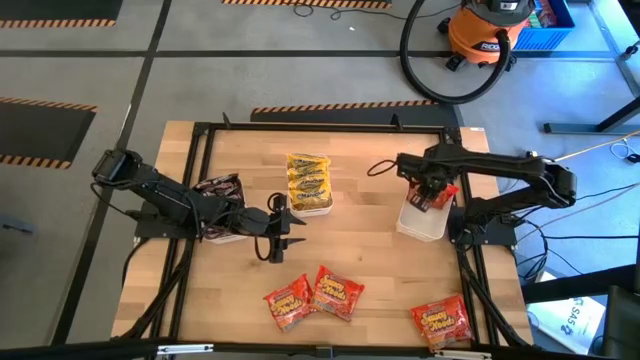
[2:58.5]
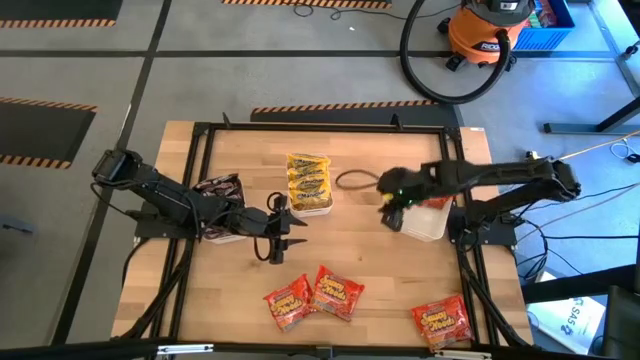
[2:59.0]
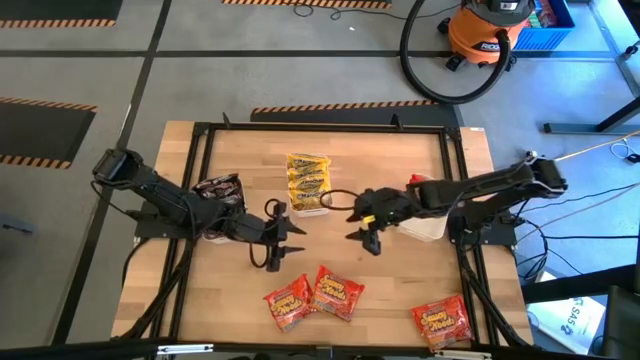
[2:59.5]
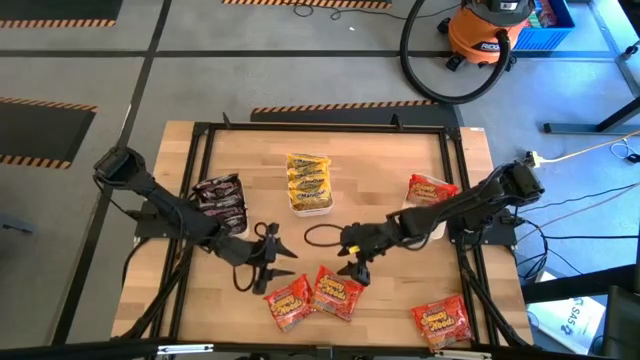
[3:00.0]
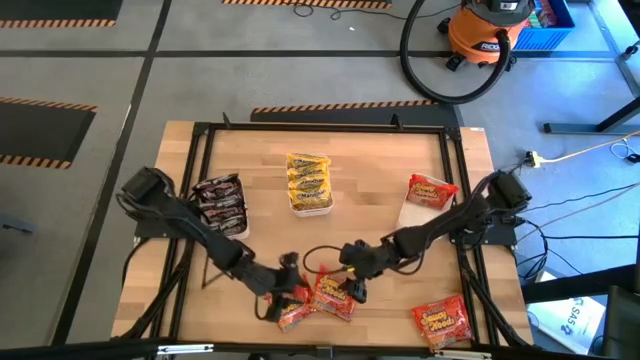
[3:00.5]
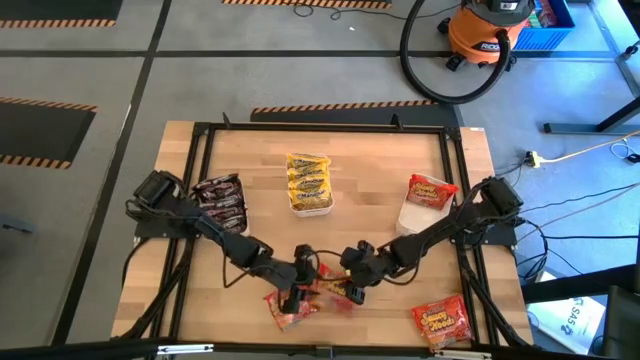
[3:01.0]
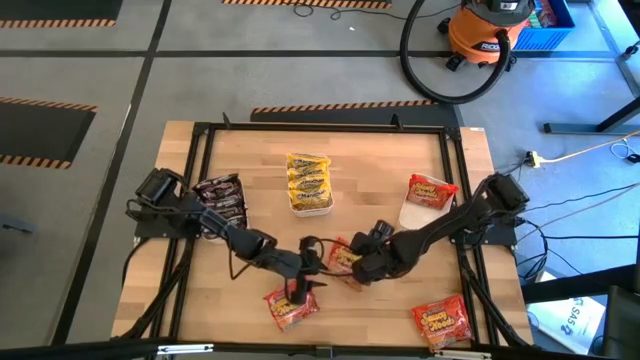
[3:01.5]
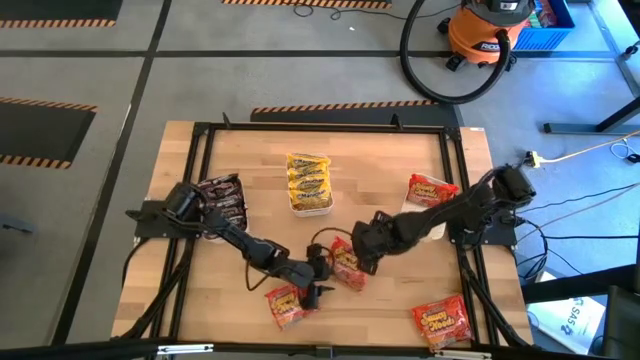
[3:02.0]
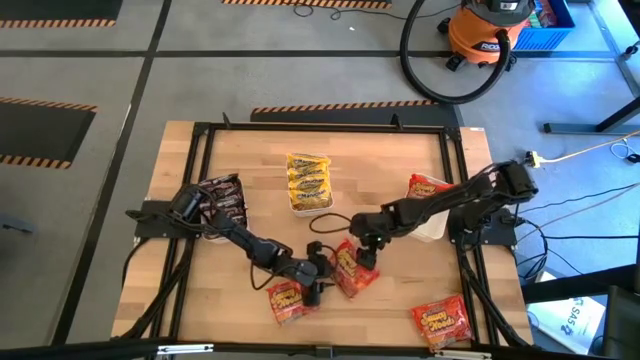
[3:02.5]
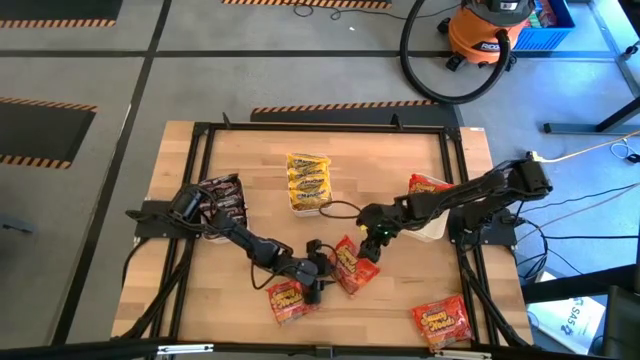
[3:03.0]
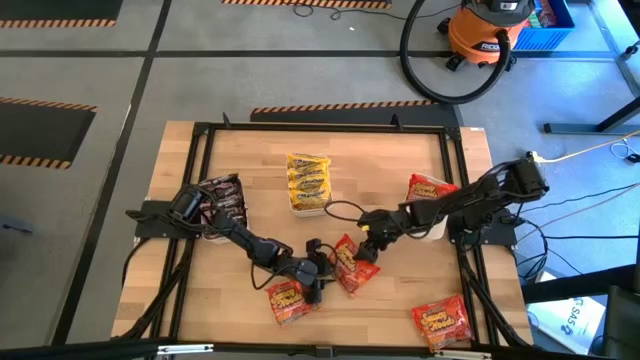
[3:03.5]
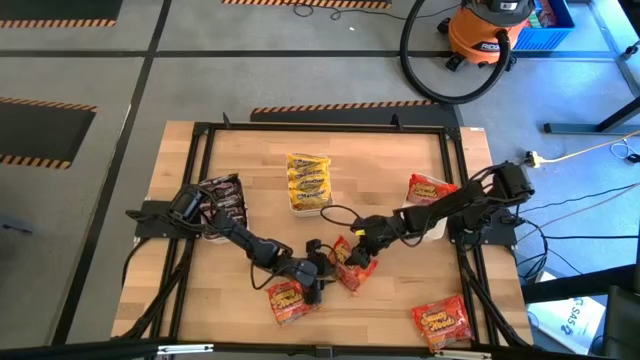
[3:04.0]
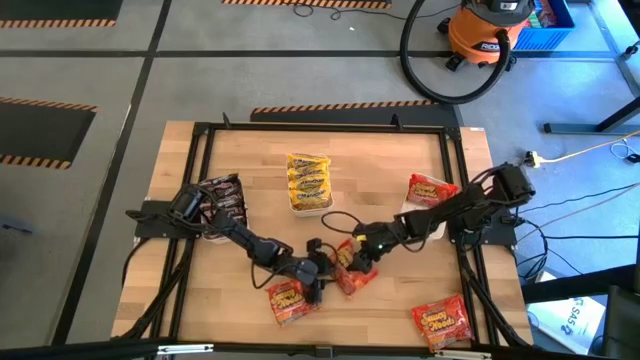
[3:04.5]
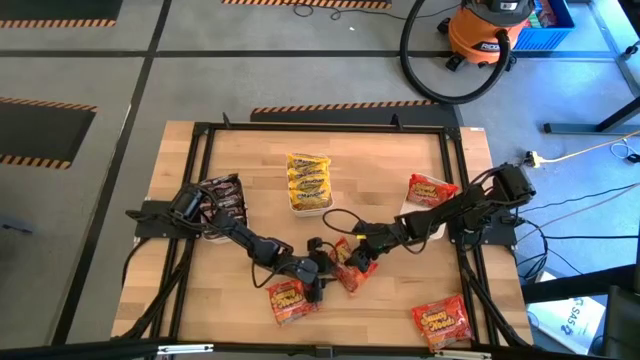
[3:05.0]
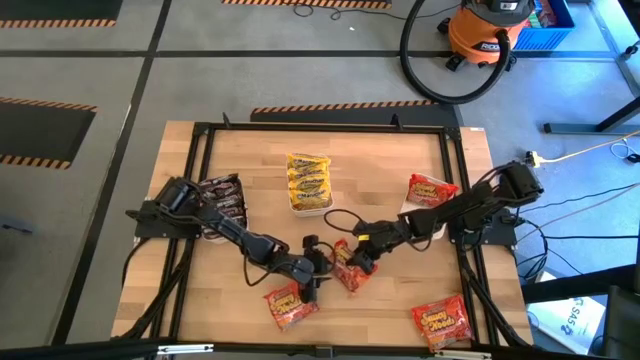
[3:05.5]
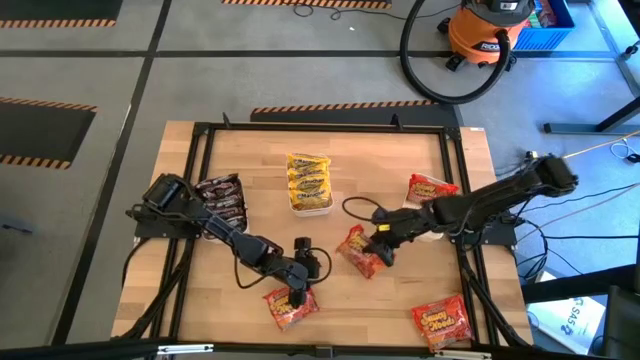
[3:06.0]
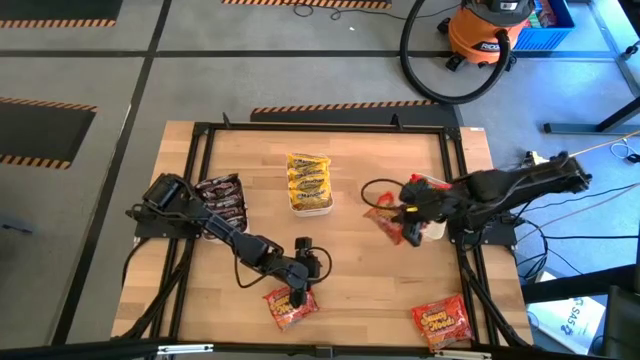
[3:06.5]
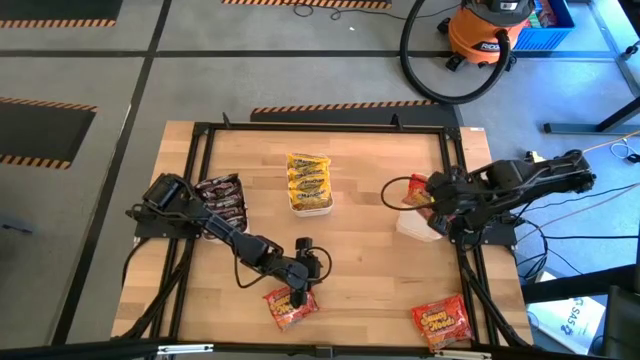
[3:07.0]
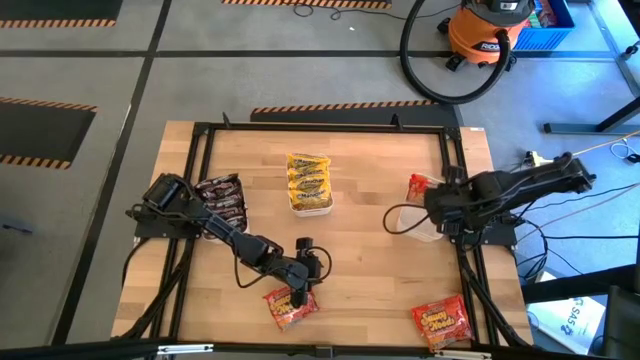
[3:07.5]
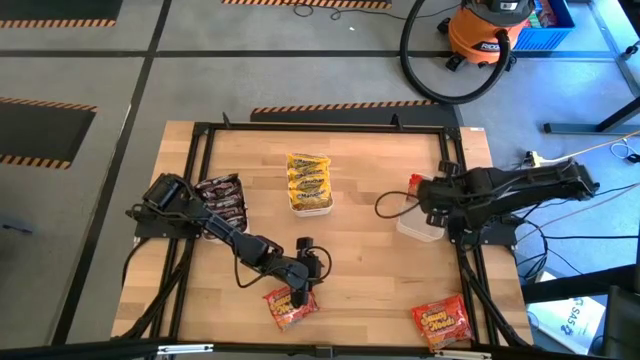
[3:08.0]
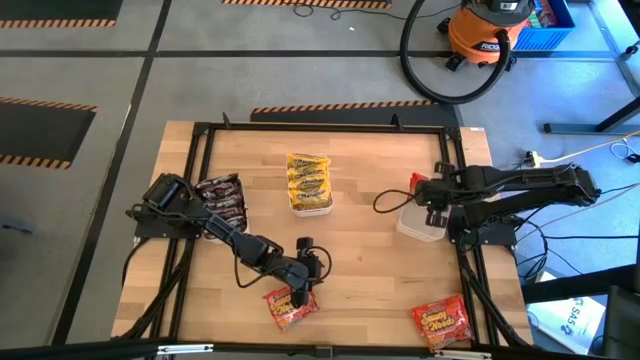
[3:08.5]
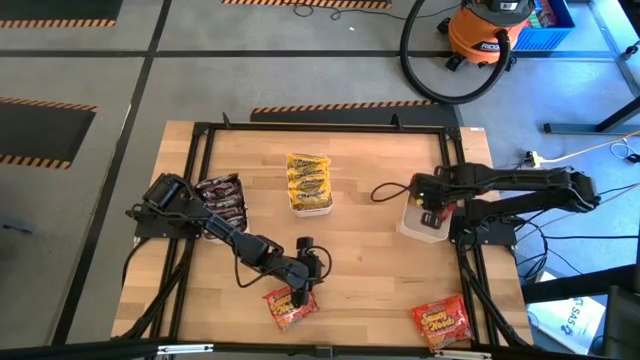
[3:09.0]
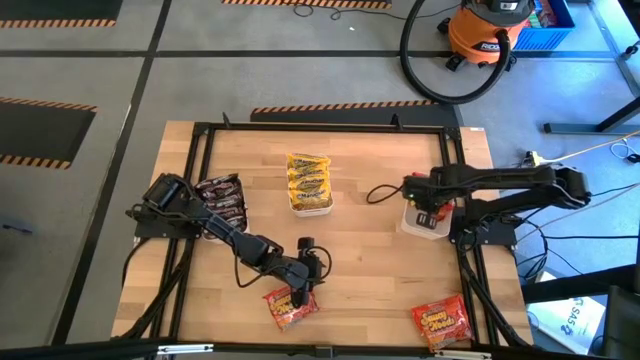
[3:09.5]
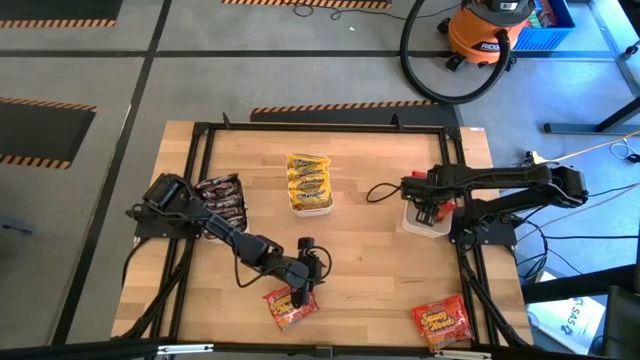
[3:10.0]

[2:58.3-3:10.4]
Task: Sort Maruchan noodles
Put the center orange noodle pack into the right white bin

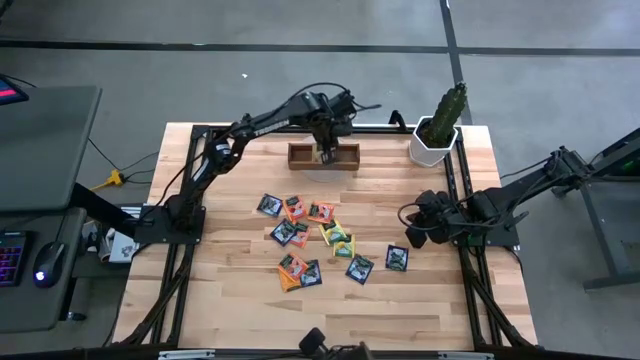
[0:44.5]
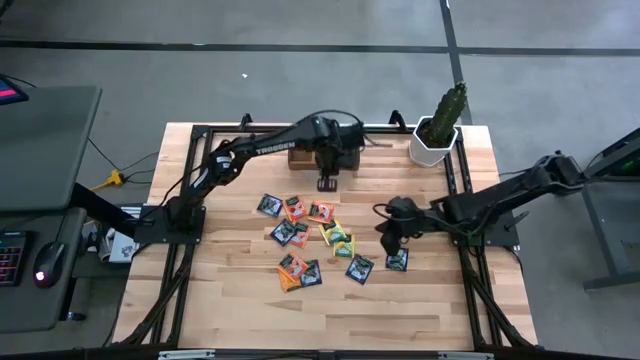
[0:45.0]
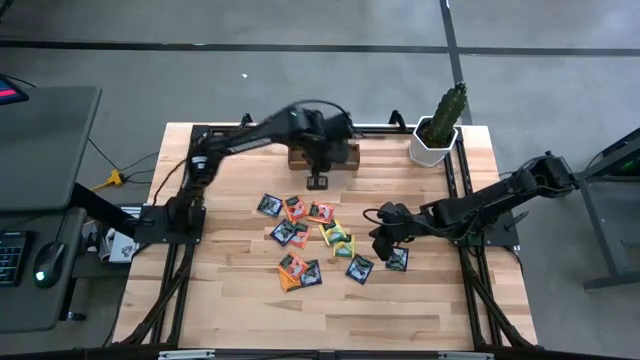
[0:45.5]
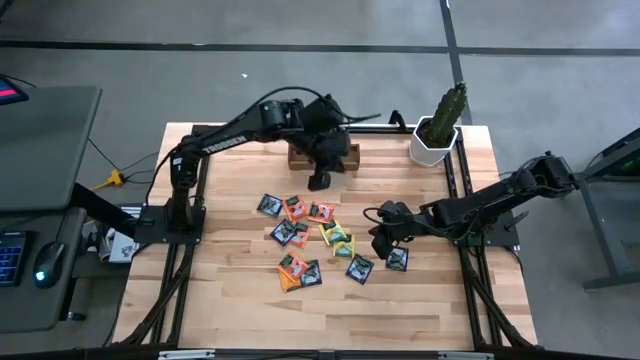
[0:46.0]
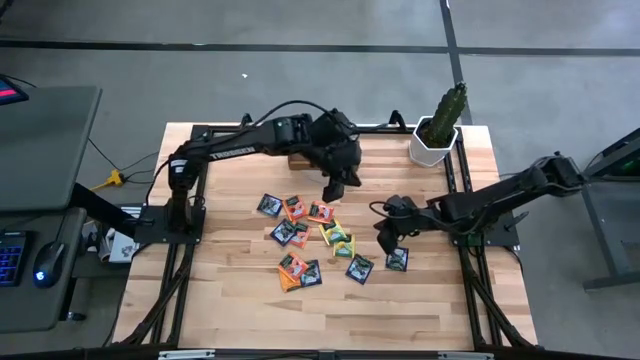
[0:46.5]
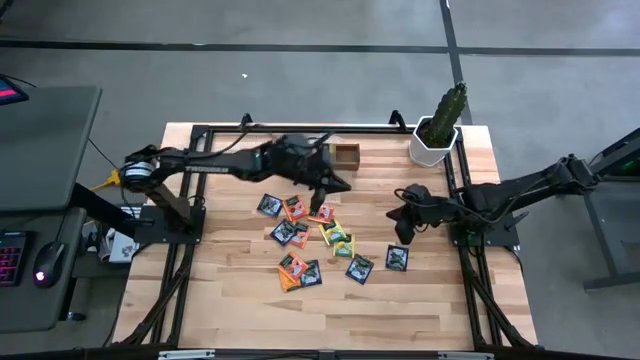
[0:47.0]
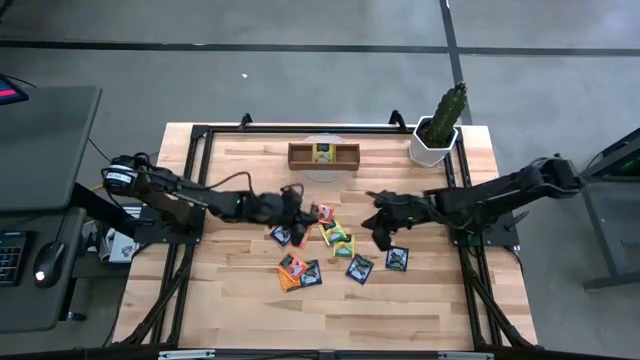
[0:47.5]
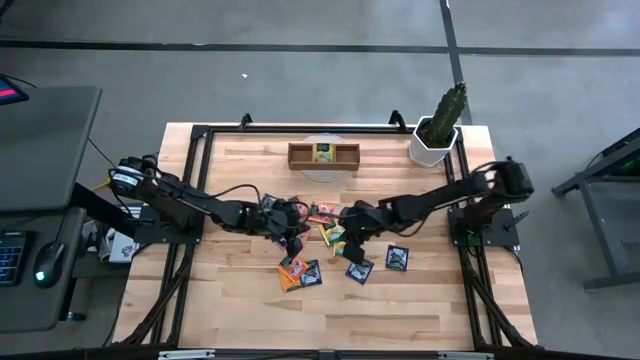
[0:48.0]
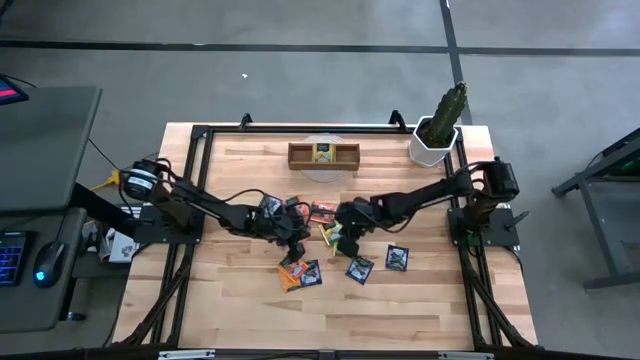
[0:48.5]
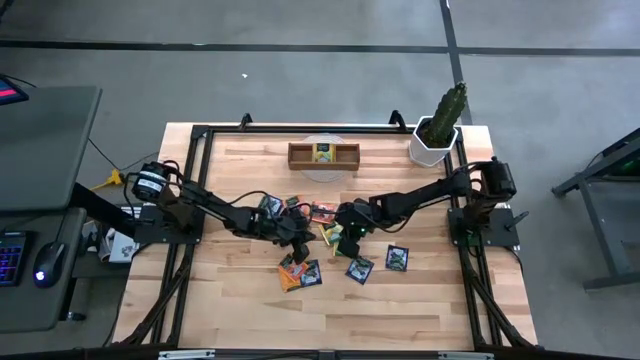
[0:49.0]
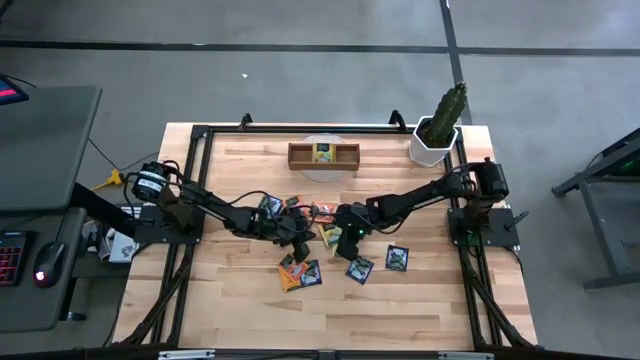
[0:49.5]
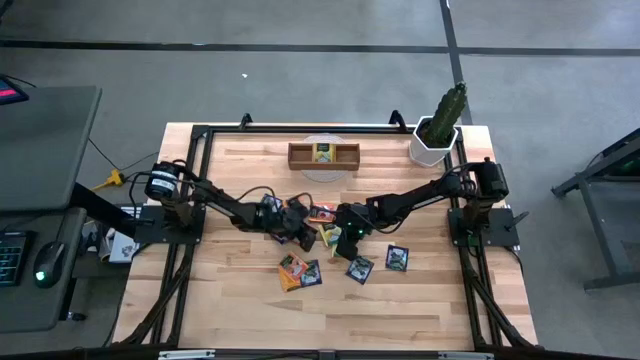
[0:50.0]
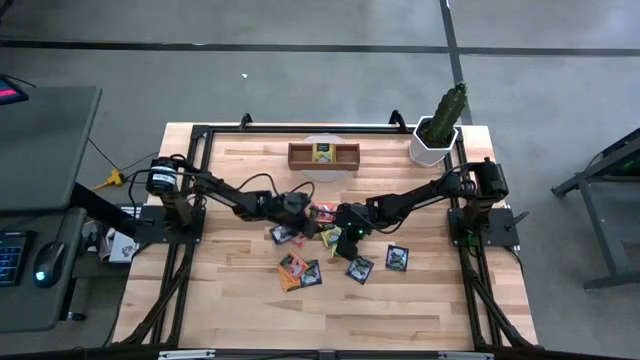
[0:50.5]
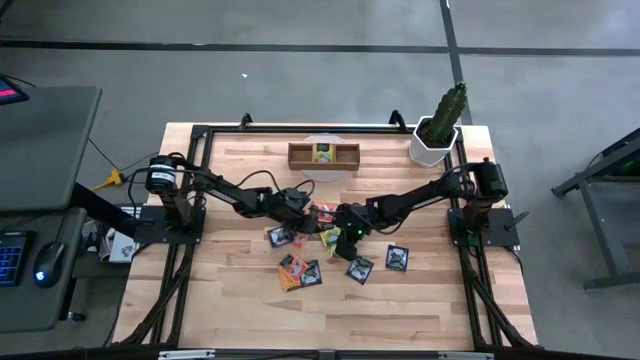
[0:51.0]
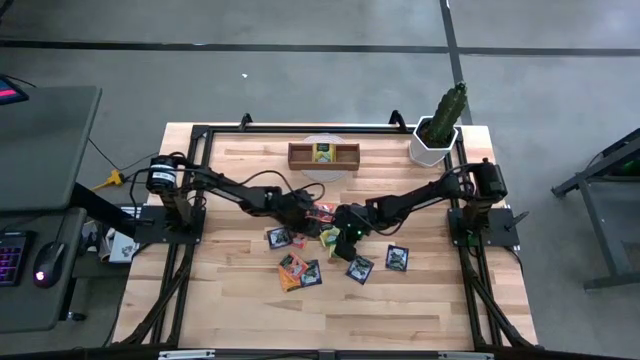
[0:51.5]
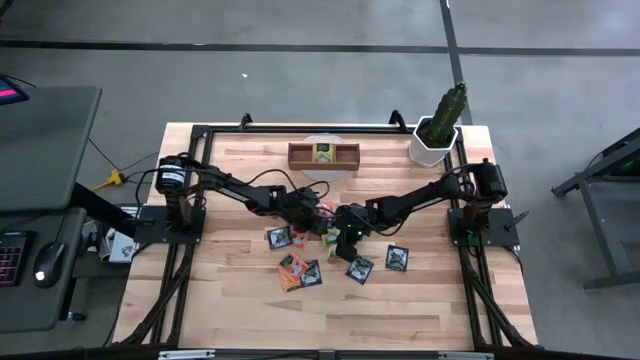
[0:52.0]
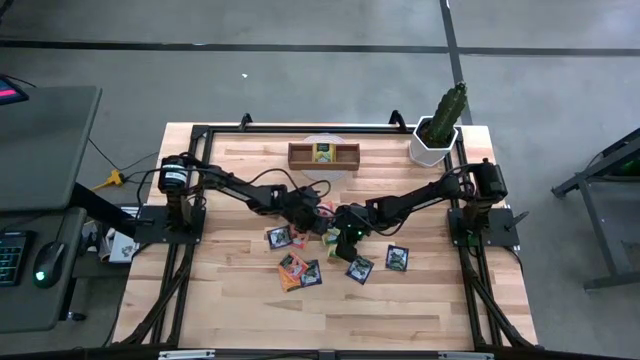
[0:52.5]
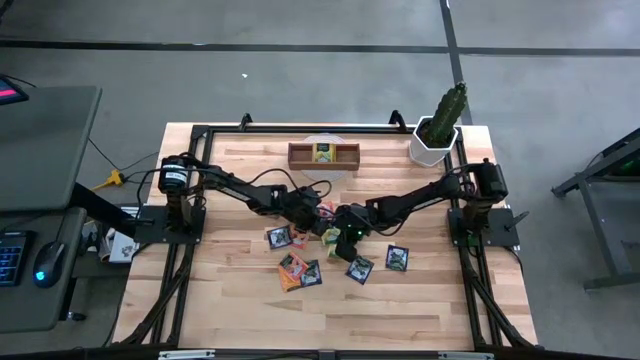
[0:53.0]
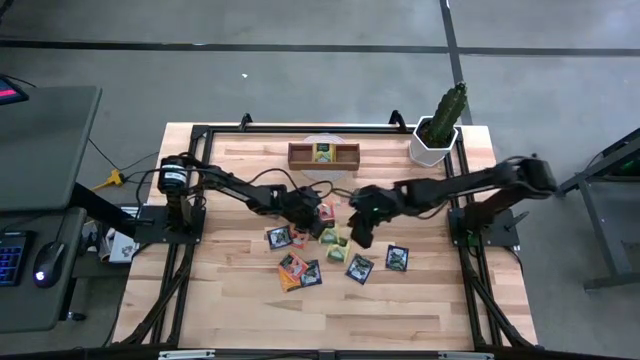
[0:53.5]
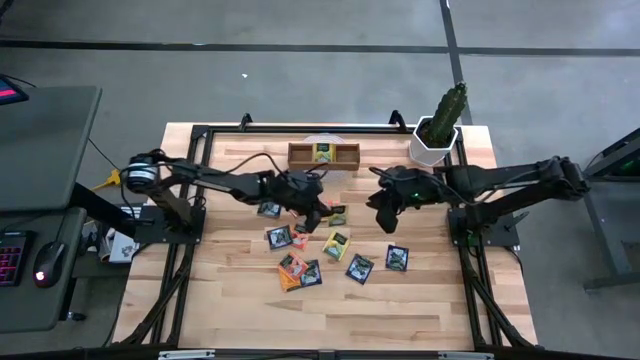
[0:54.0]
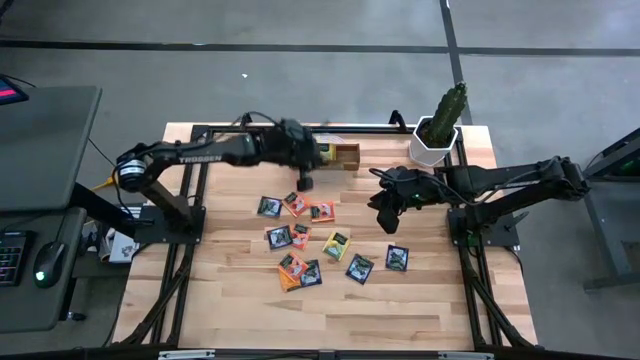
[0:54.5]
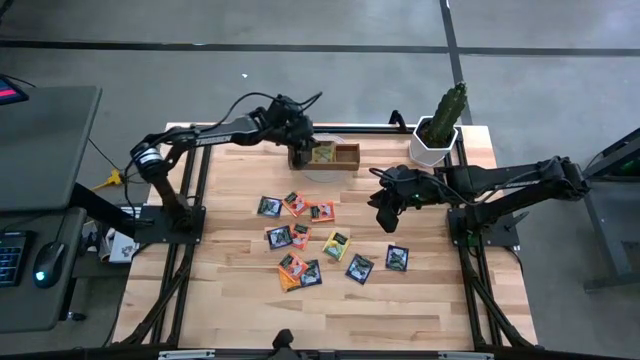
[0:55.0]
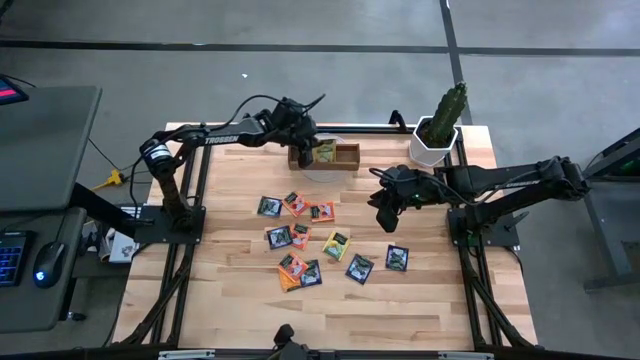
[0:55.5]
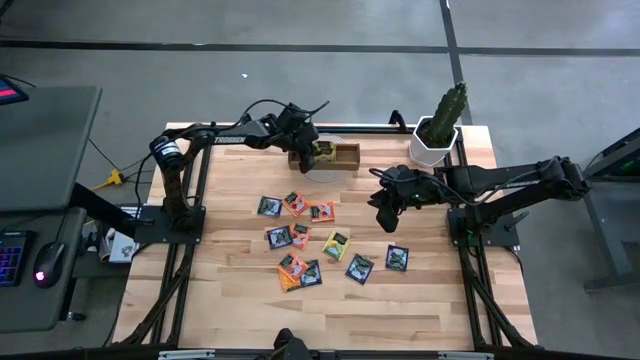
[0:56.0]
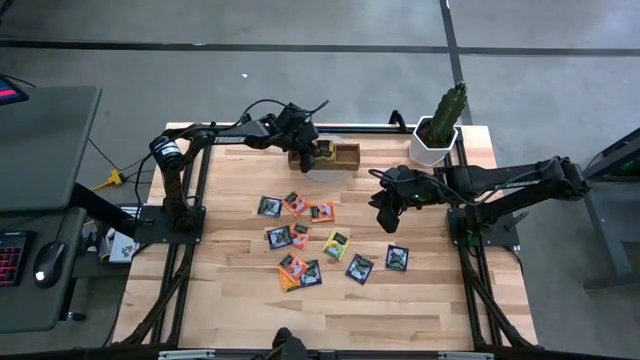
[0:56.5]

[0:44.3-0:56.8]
Task: Pick & Place Tea
Put the top yellow tea bag in the middle compartment of the organizer
